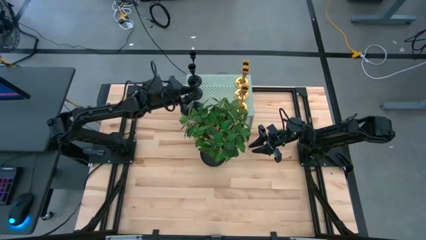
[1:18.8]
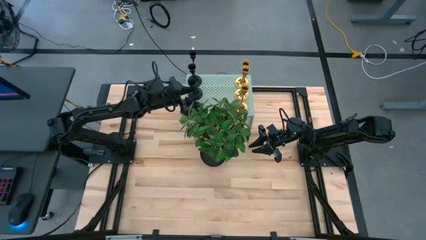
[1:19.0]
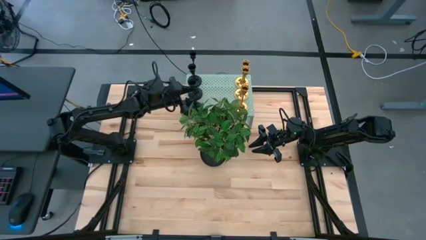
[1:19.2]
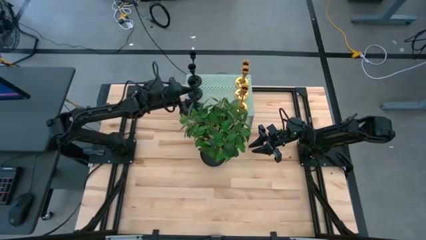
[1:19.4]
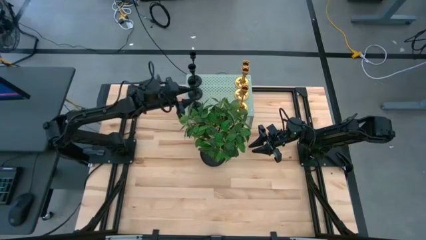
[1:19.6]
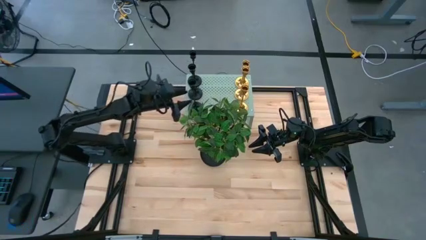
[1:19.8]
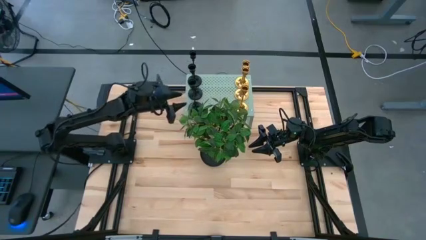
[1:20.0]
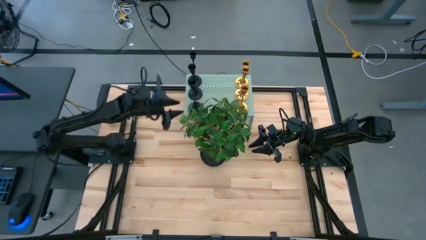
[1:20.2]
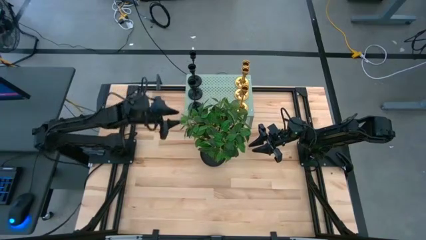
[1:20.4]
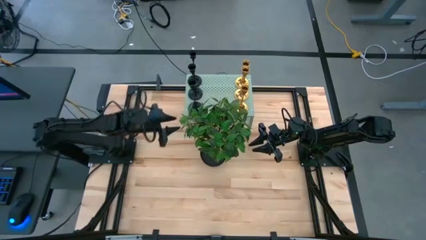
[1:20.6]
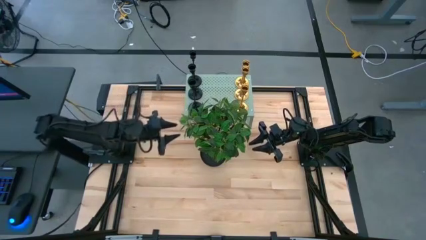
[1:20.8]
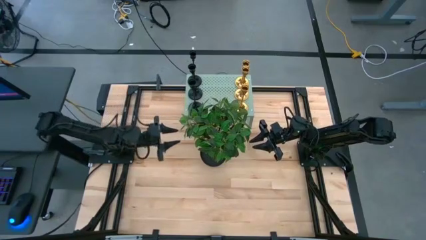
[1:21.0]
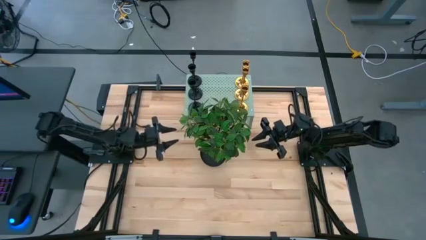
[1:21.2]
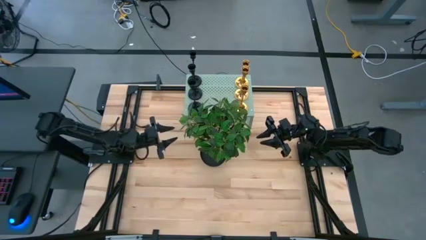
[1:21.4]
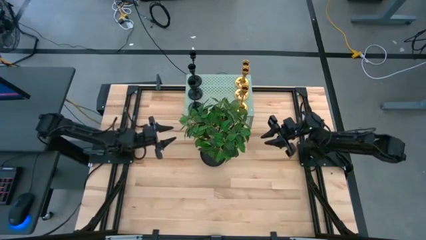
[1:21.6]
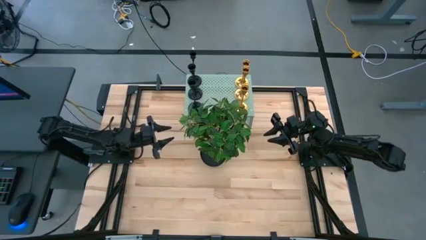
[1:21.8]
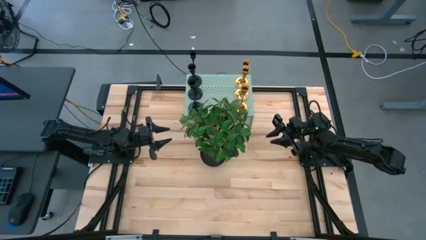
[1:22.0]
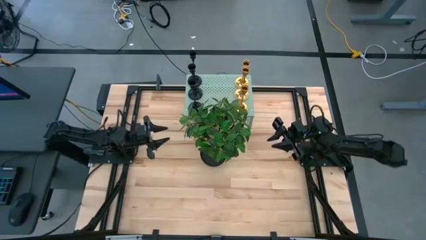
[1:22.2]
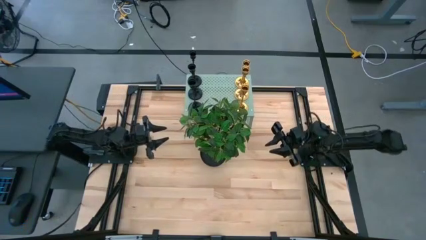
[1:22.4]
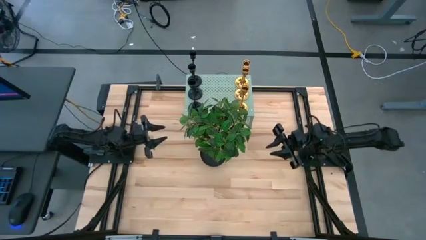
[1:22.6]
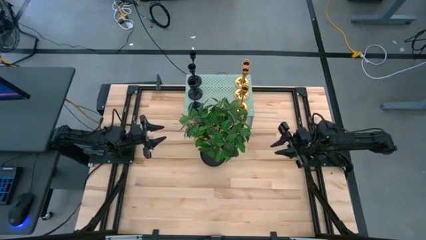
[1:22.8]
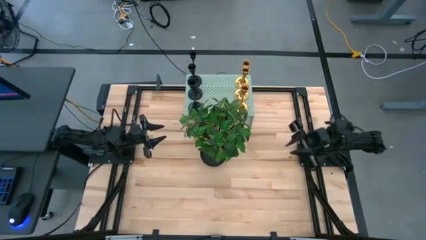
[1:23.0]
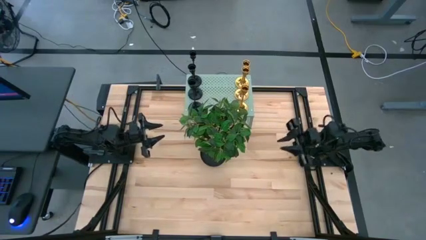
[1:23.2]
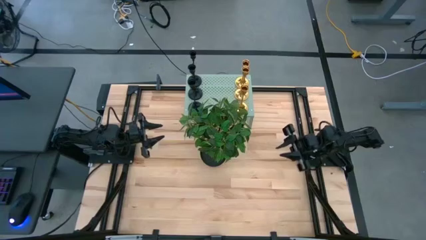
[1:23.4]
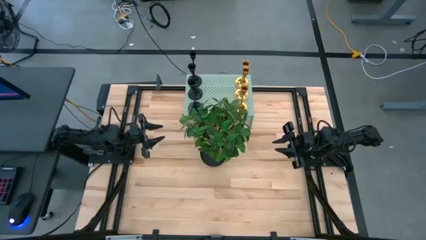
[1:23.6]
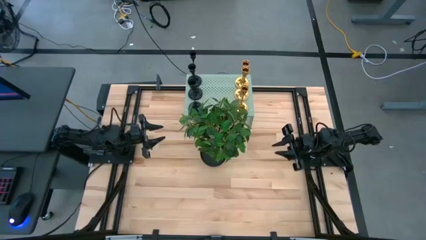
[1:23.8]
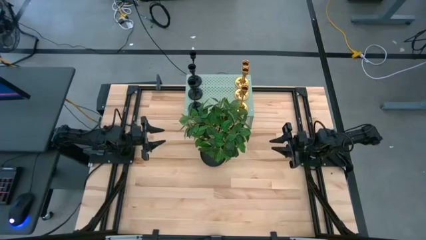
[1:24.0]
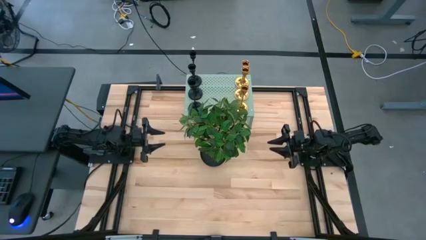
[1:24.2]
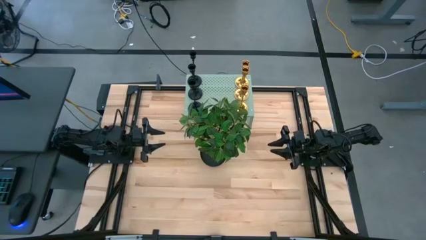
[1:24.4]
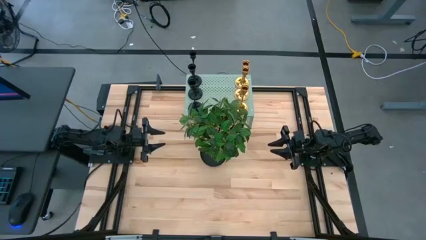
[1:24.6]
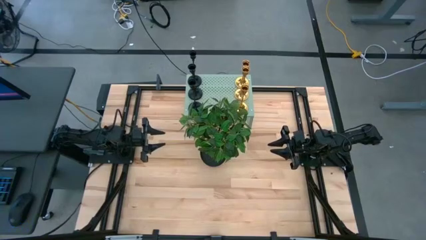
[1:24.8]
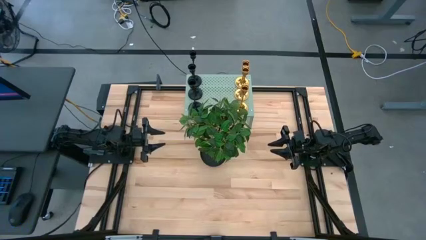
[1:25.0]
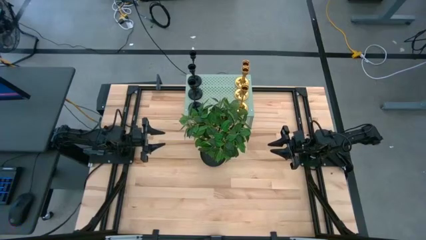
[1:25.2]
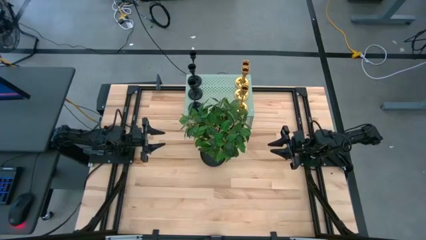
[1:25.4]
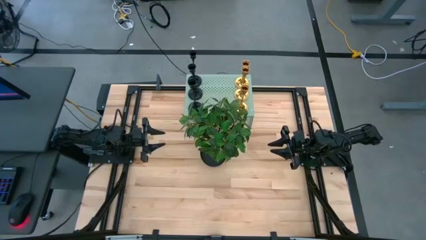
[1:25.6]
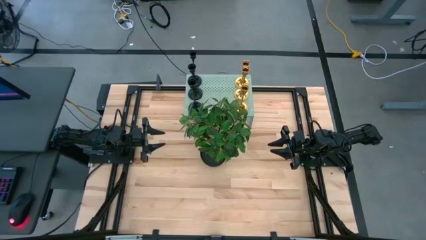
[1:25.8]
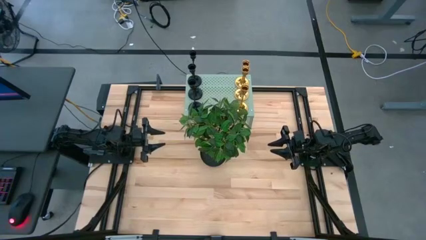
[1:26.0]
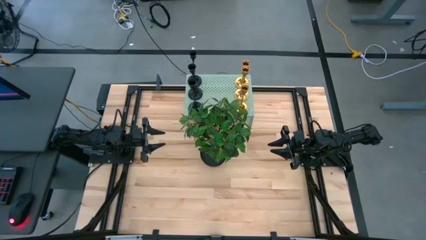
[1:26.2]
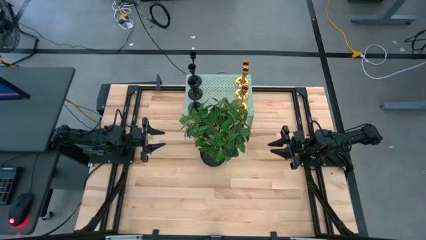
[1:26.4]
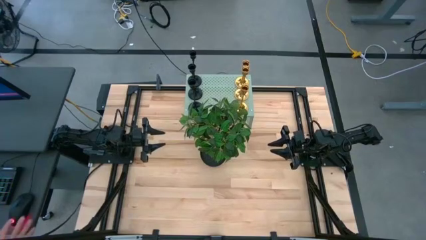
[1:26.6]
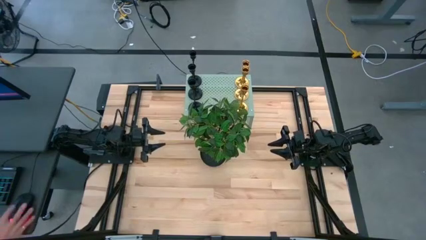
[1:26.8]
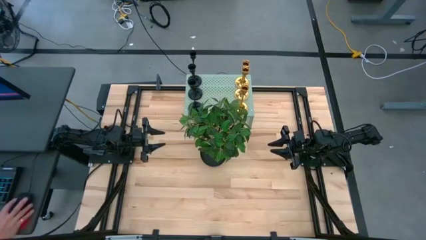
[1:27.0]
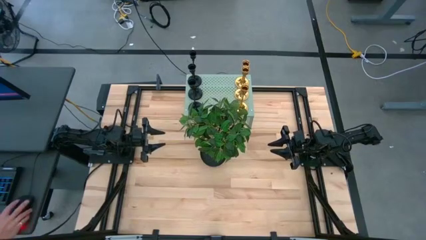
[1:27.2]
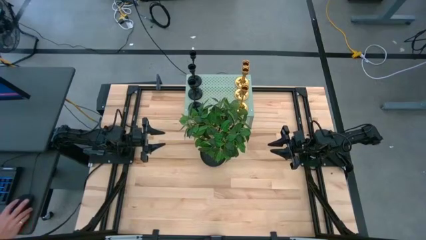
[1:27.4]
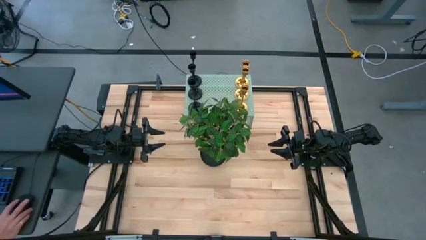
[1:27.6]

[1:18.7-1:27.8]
Task: Pick & Place candle stick holders
Return to Home Position

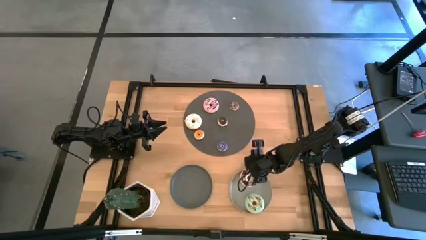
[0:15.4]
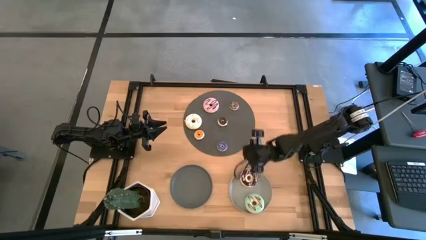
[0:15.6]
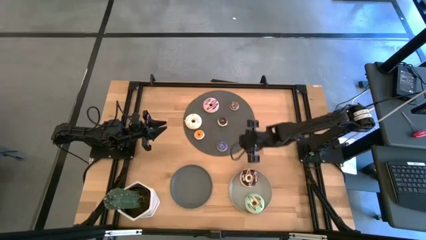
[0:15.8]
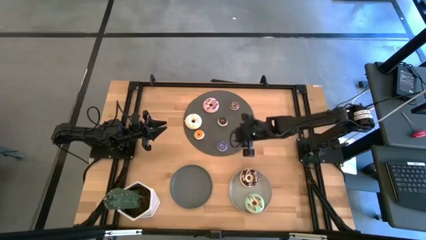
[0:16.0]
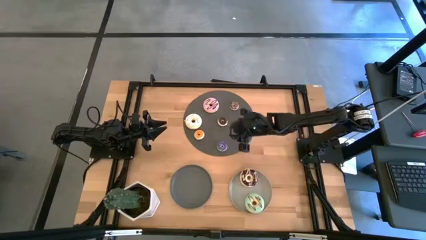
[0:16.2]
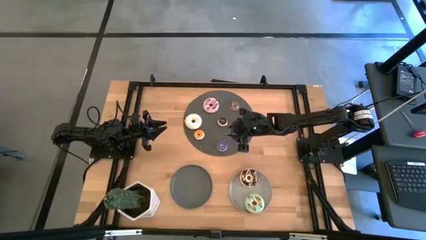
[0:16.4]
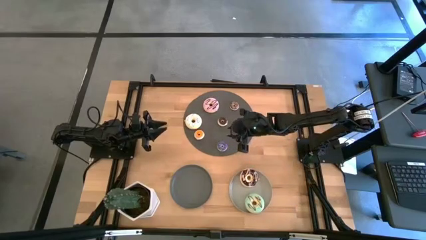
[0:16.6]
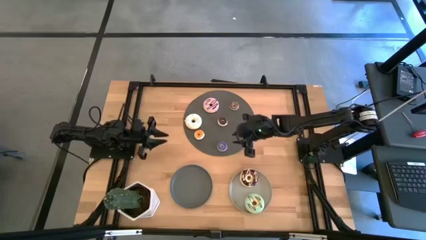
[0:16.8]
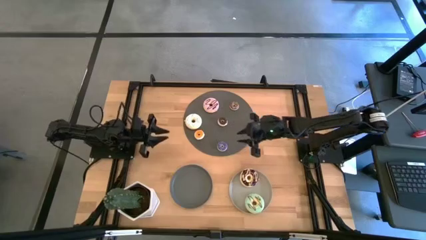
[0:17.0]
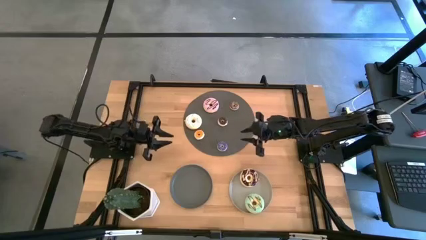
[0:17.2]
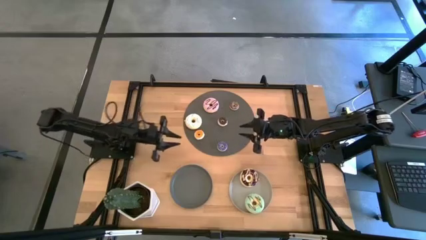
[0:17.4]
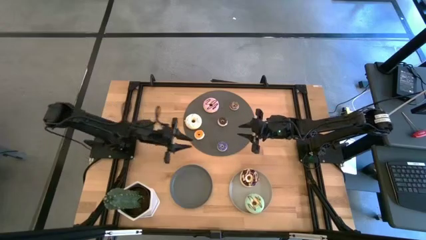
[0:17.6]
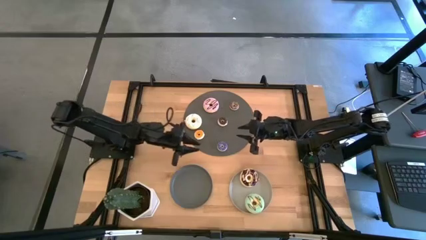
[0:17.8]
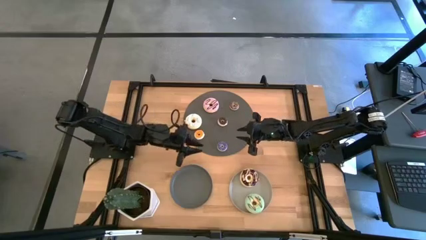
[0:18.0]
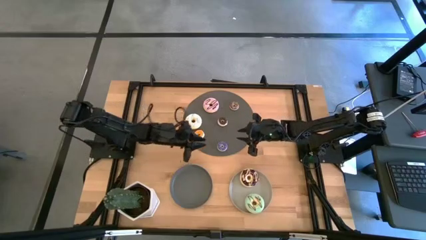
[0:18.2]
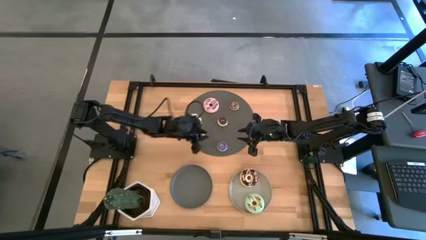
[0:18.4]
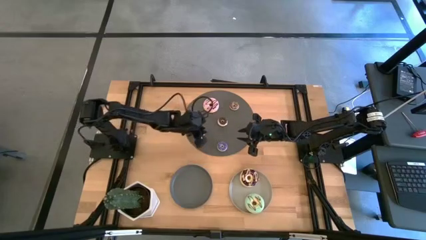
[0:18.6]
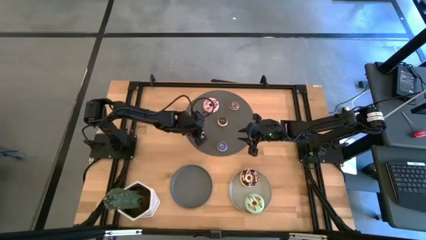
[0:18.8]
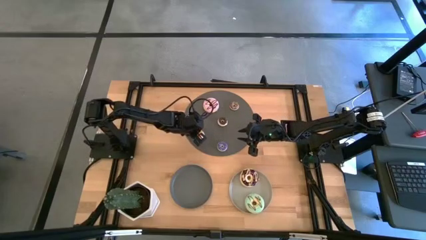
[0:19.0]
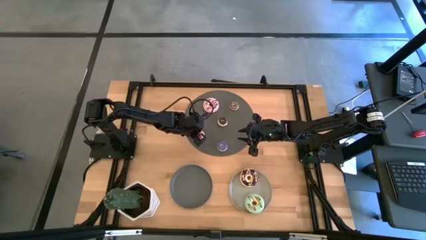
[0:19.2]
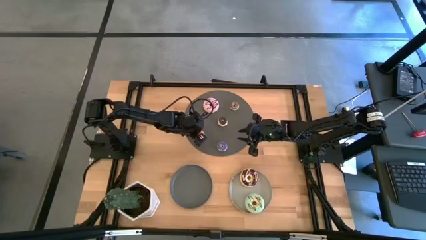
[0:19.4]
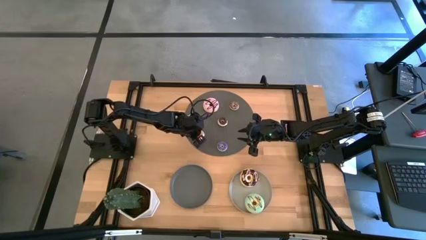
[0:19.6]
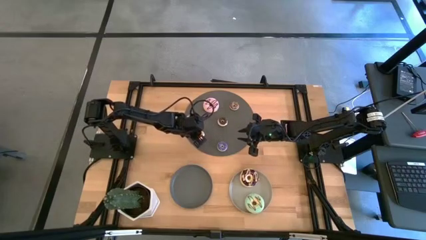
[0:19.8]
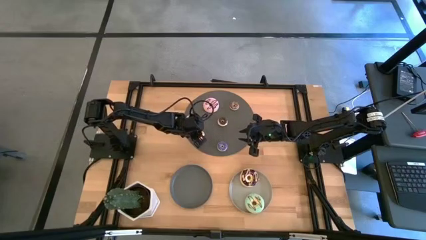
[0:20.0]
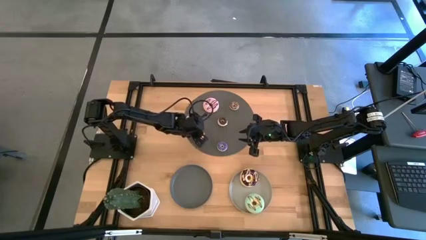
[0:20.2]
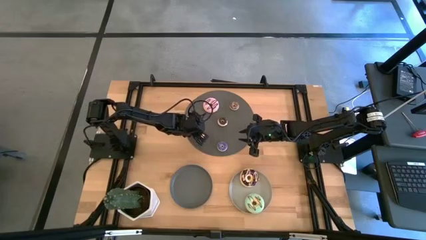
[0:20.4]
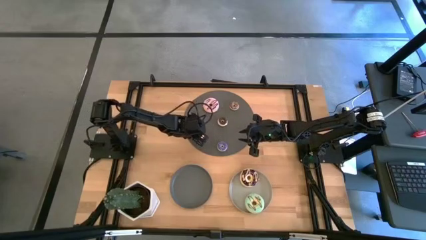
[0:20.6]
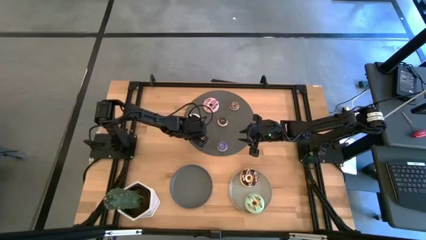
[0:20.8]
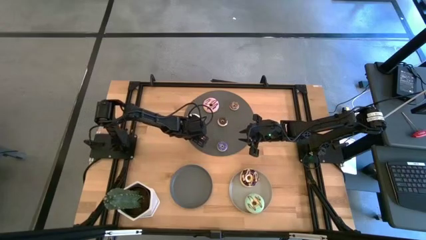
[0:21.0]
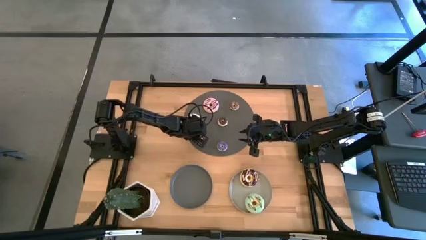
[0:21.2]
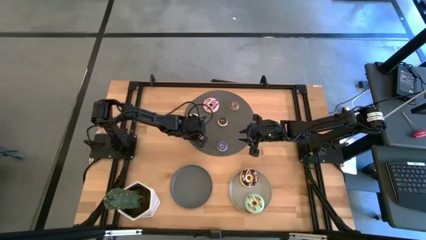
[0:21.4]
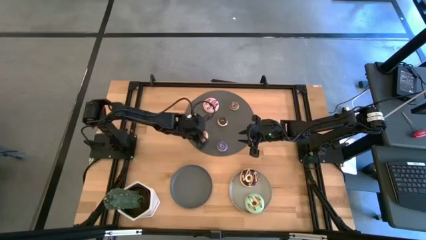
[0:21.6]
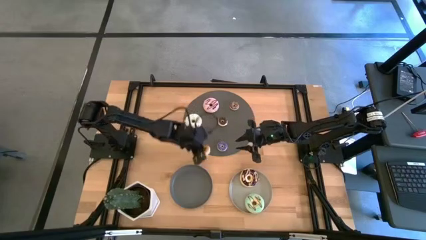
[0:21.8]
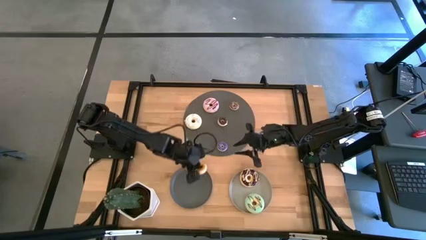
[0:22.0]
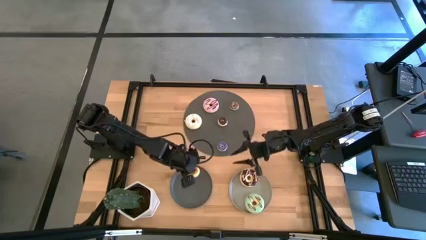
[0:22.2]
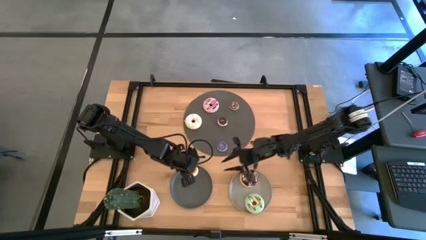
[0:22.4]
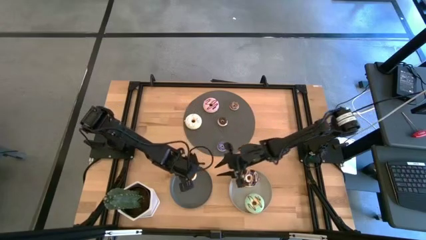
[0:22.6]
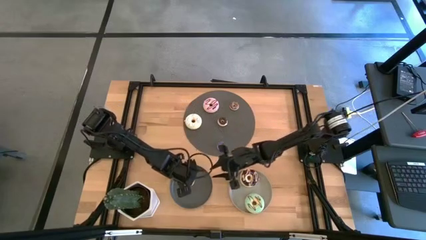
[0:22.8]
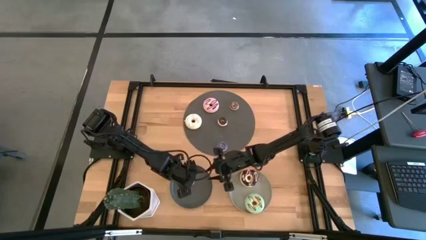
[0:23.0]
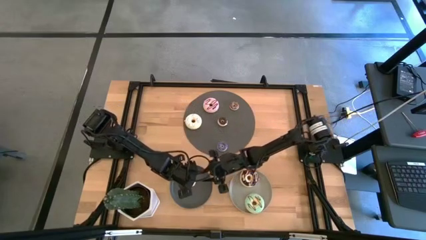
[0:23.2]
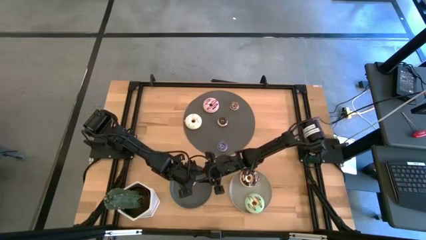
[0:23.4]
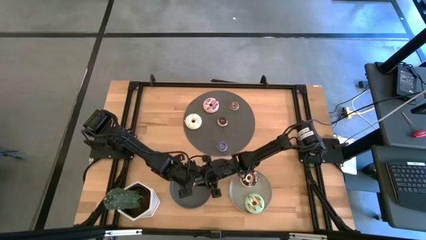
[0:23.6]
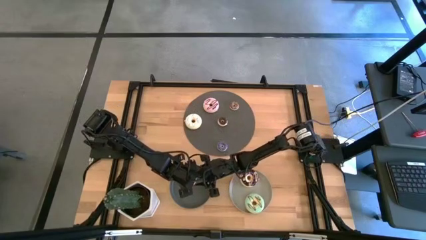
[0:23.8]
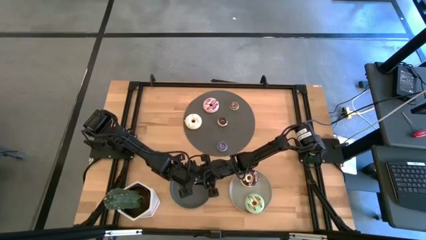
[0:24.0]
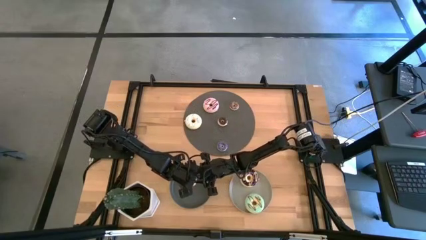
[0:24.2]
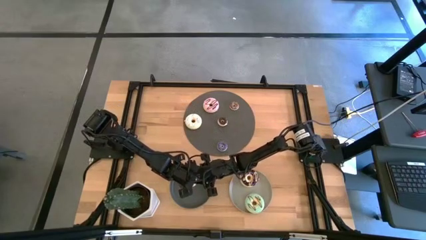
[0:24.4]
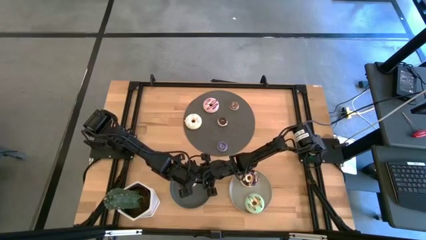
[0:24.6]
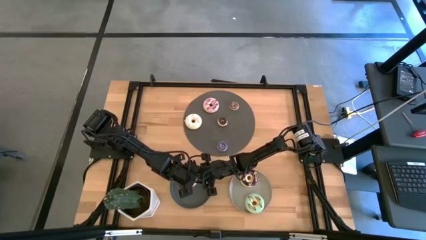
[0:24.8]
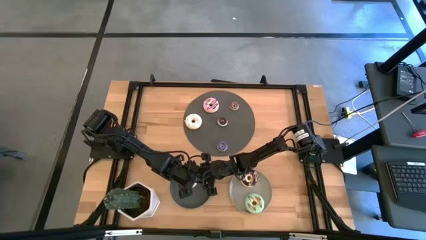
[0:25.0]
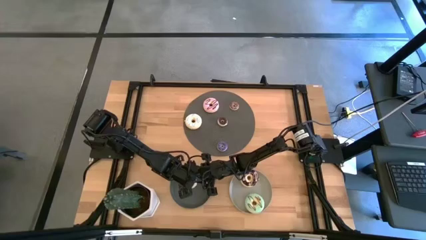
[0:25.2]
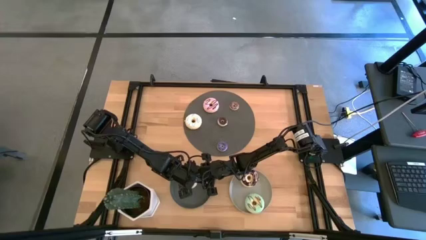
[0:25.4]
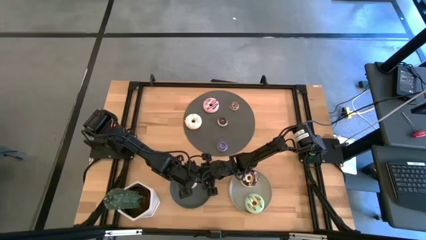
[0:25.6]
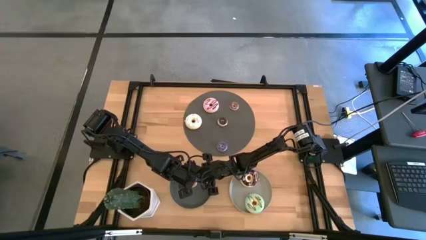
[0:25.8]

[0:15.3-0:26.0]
Task: Pick & Place donuts
Put small orange donut on the black plate
